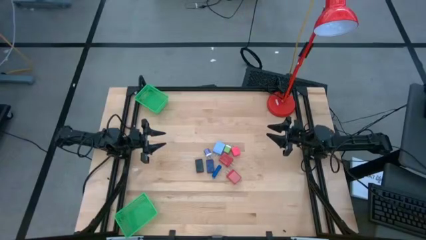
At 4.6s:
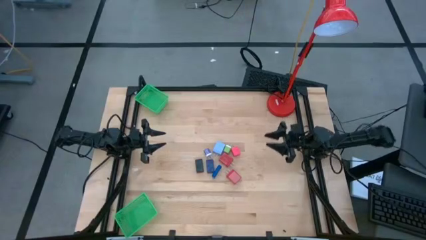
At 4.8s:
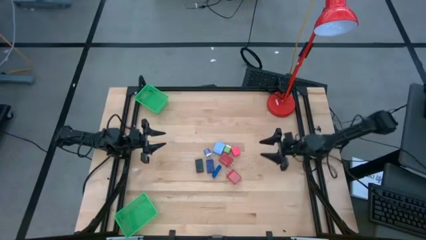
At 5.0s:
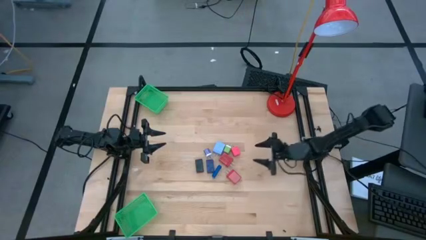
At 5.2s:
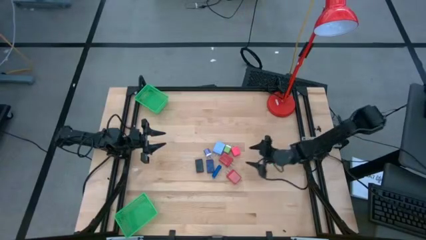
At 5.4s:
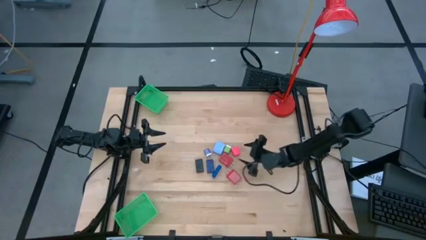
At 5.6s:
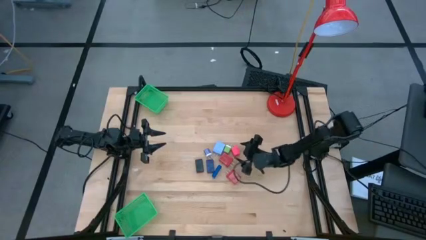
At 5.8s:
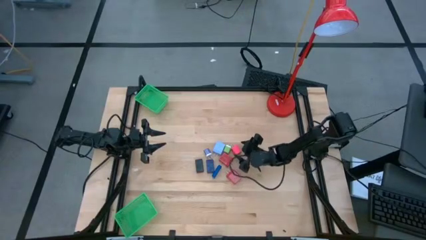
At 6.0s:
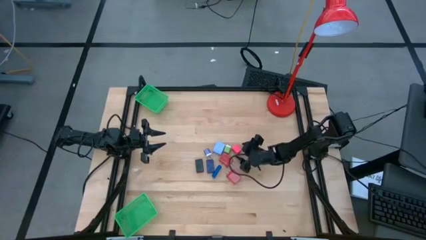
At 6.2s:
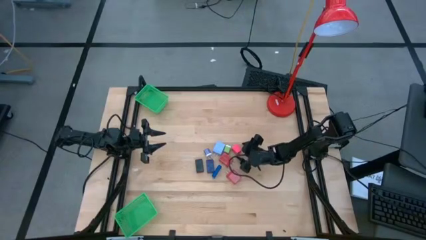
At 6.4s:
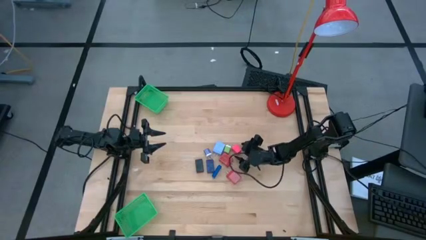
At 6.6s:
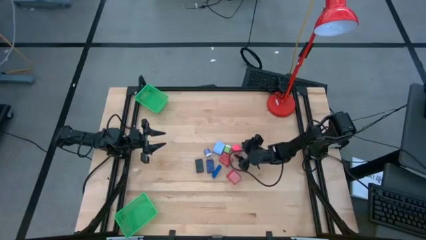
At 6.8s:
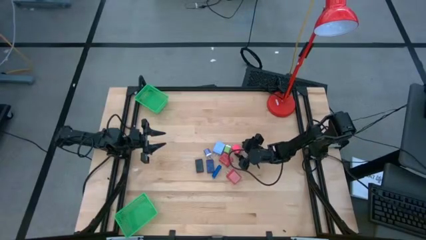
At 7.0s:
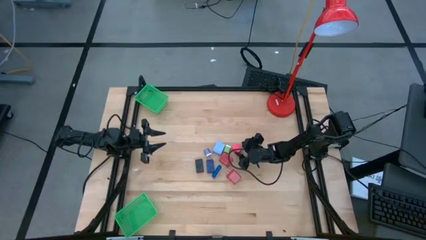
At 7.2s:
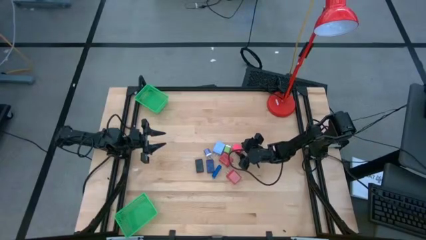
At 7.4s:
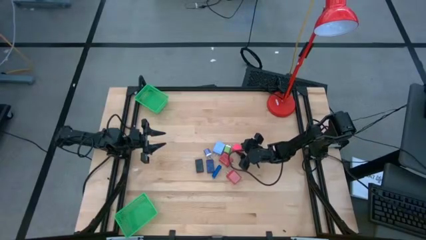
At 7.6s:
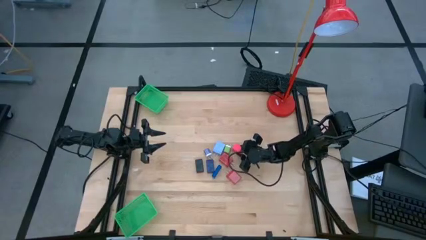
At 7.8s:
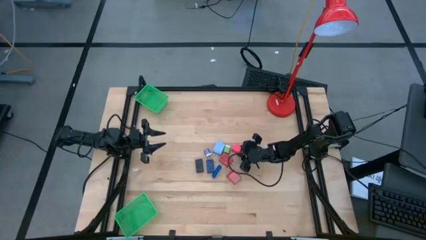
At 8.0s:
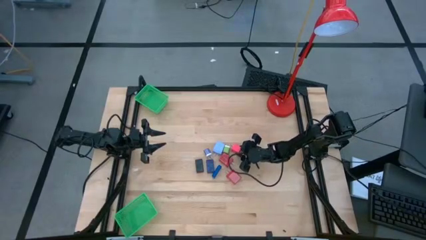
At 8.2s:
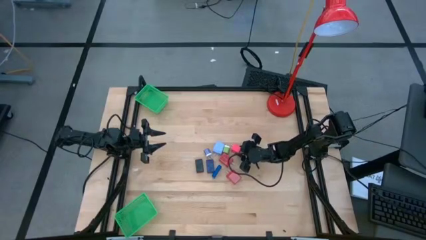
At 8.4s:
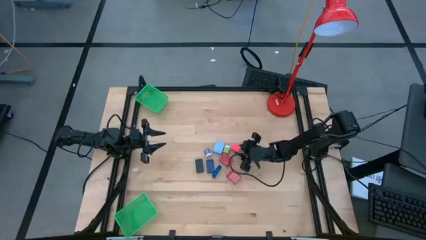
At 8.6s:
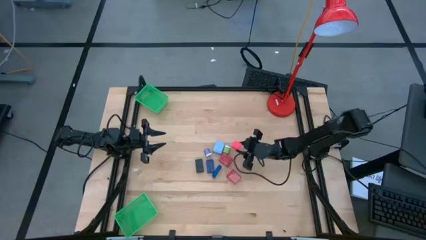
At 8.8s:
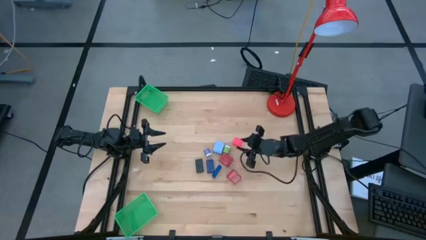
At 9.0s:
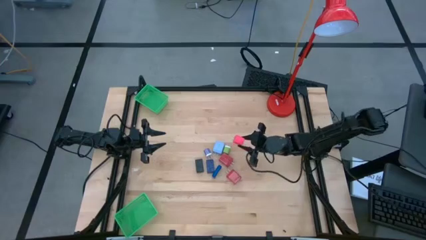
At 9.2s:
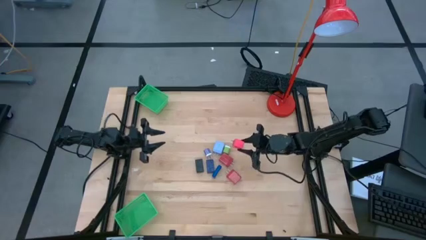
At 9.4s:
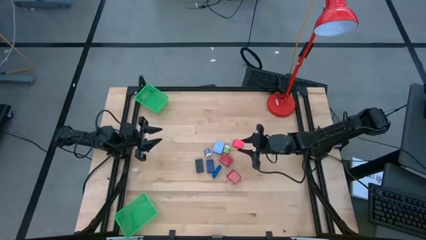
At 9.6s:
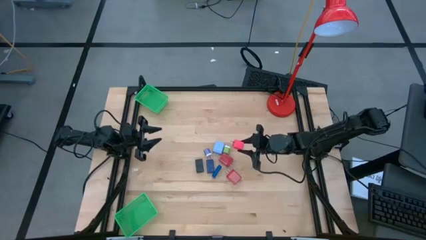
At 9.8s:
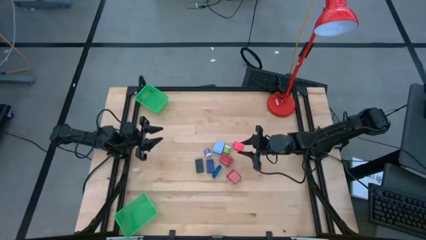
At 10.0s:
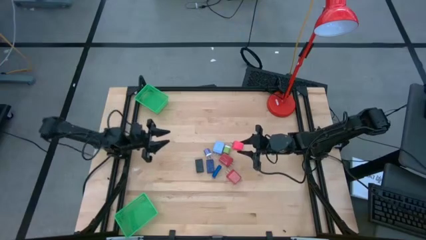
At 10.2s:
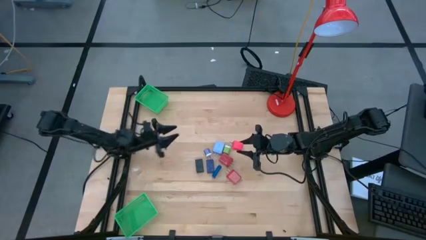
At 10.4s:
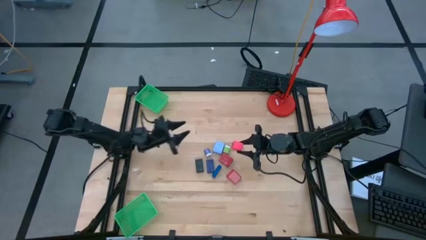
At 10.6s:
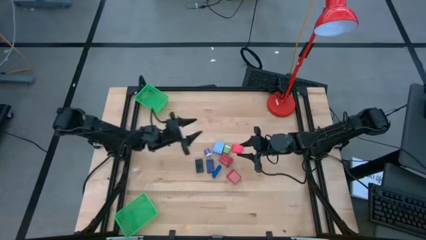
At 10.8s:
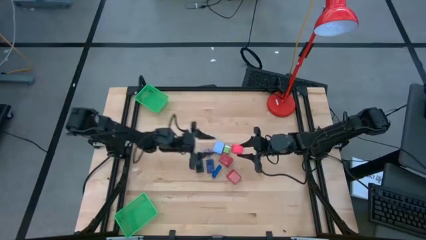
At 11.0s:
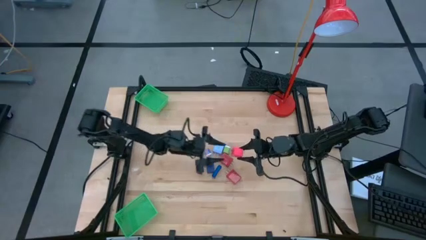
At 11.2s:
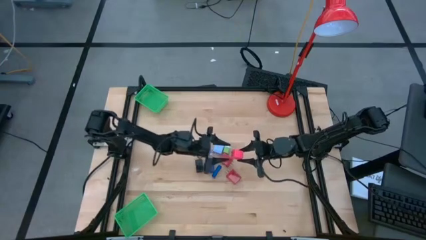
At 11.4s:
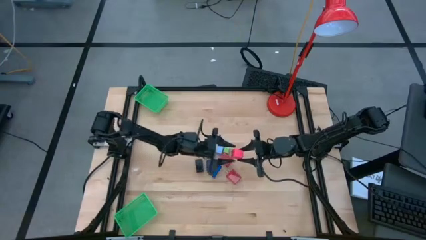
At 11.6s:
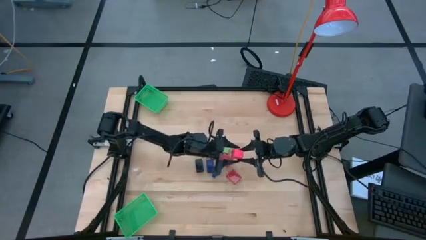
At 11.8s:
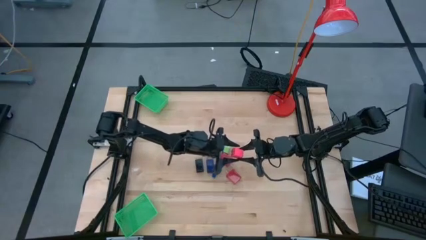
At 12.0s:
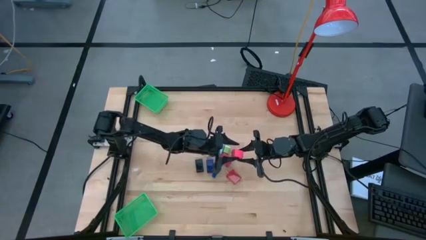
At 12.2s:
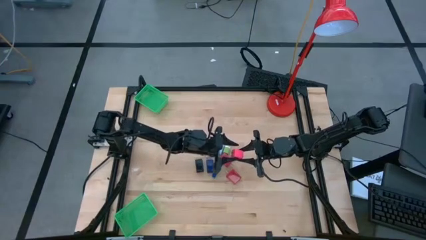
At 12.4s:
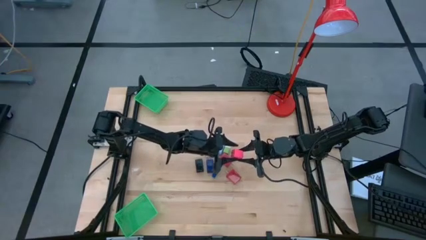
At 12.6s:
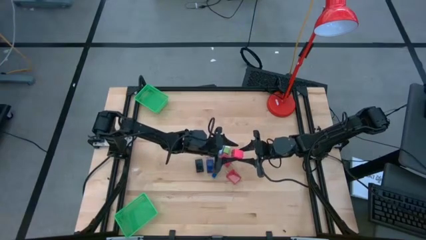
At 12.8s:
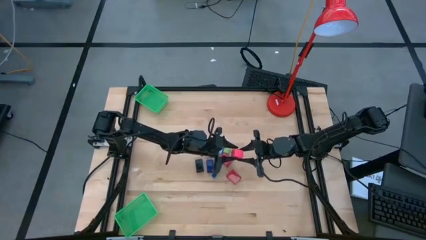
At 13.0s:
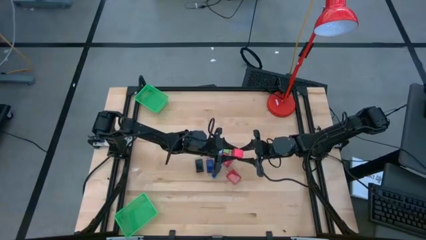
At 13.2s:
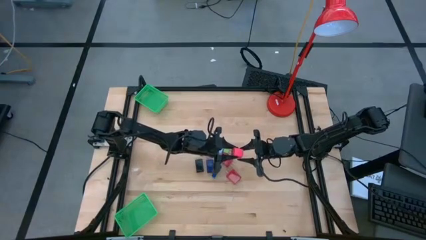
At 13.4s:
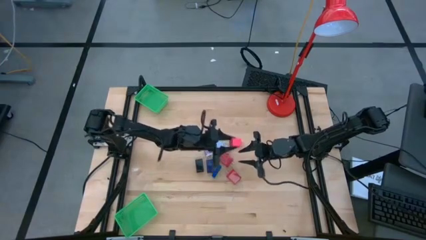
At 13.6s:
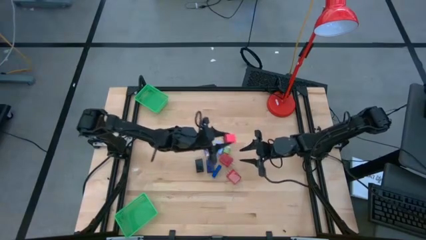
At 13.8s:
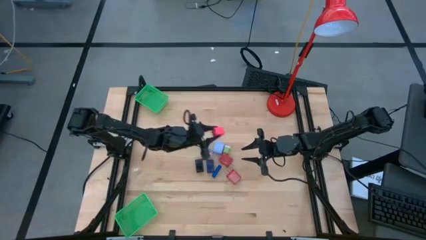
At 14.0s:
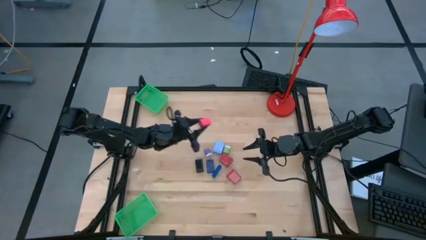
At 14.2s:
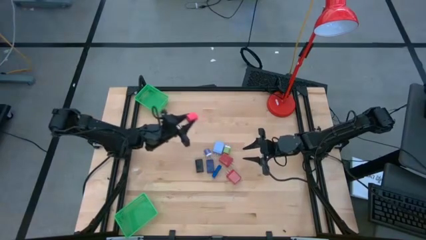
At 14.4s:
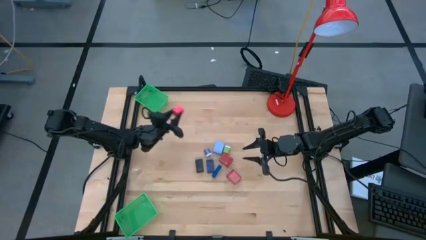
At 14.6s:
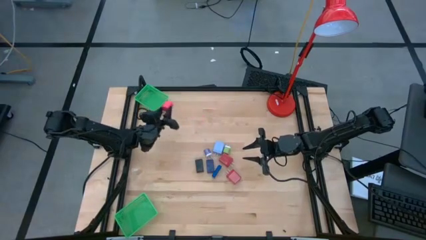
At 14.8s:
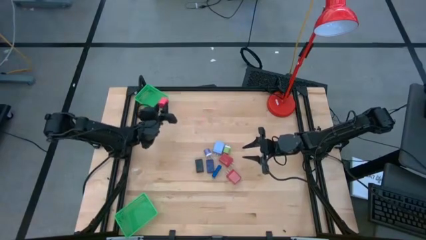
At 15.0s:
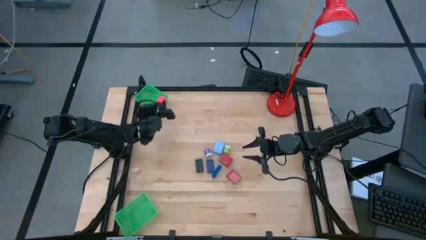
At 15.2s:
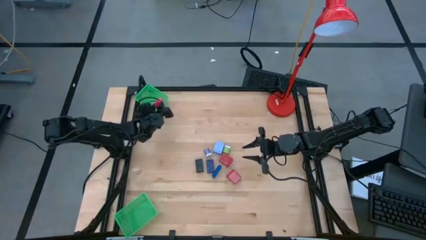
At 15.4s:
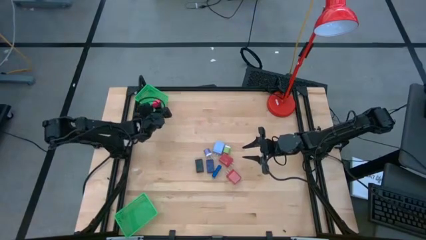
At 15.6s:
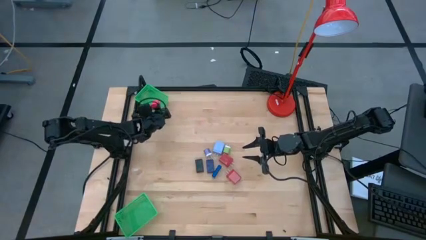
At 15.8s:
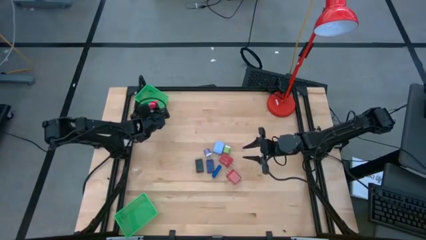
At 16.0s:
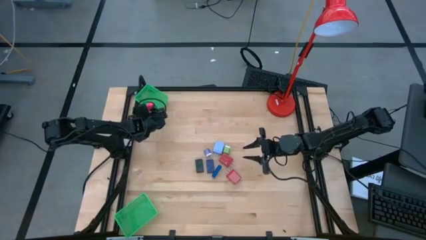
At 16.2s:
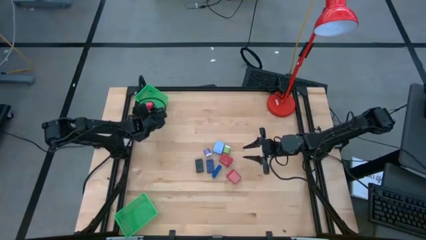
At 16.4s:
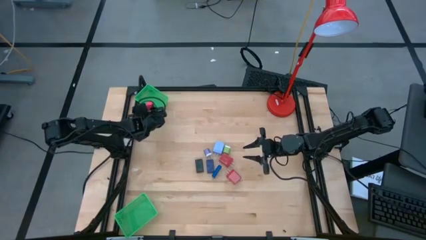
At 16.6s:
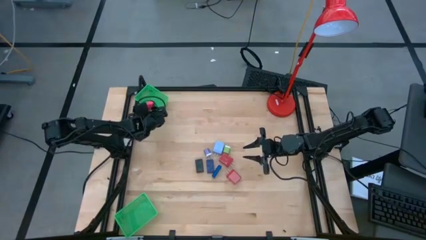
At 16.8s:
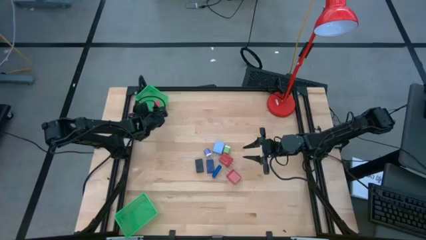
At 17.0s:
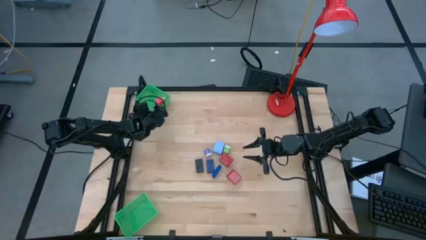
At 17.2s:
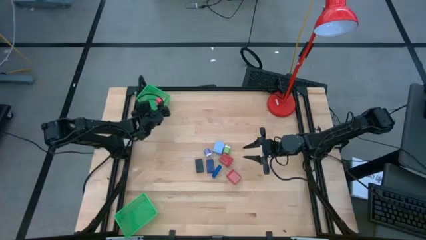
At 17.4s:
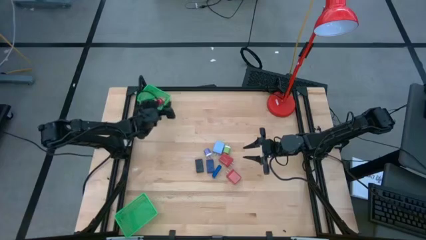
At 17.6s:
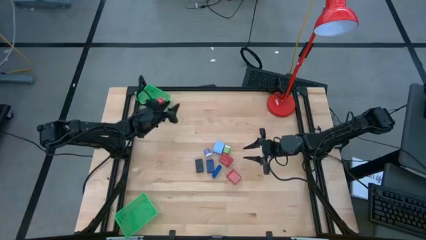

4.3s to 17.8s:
Task: Pick & Place Office items
Put the pink charger adapter into the top green basket
